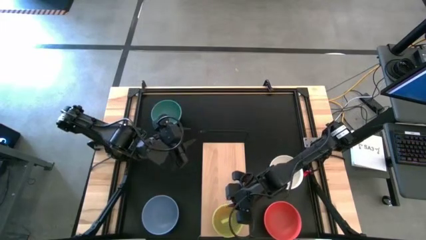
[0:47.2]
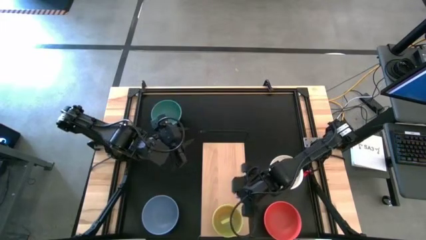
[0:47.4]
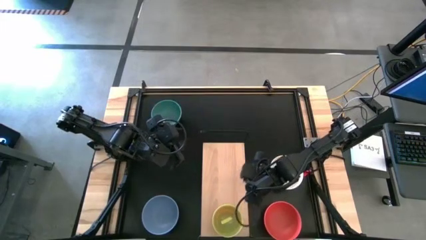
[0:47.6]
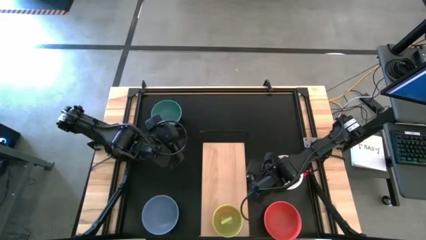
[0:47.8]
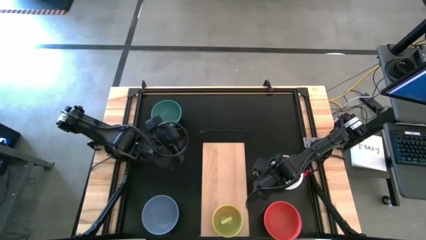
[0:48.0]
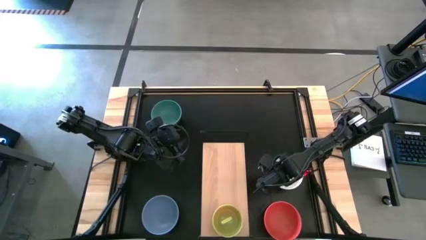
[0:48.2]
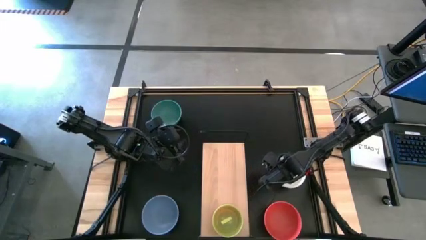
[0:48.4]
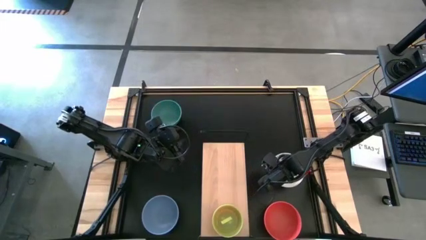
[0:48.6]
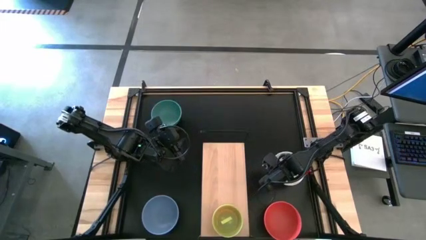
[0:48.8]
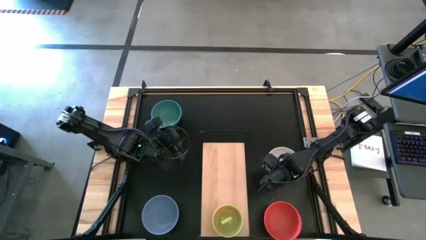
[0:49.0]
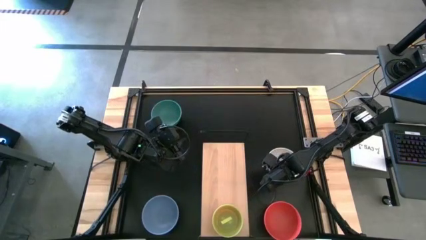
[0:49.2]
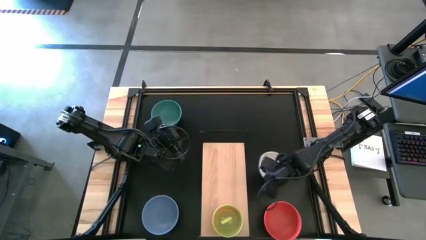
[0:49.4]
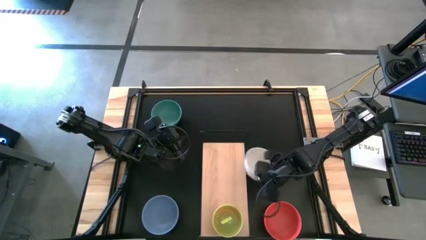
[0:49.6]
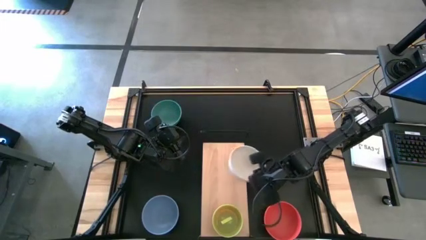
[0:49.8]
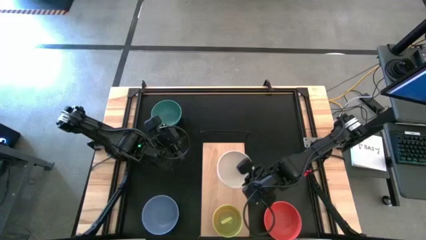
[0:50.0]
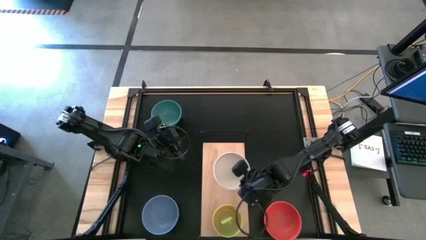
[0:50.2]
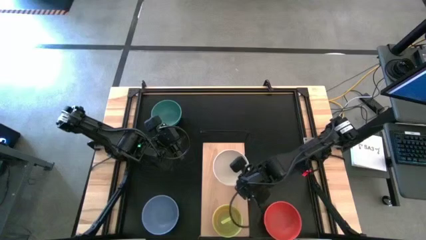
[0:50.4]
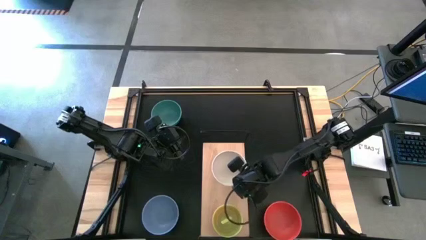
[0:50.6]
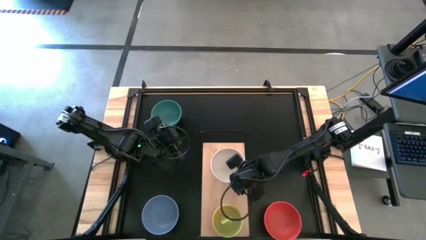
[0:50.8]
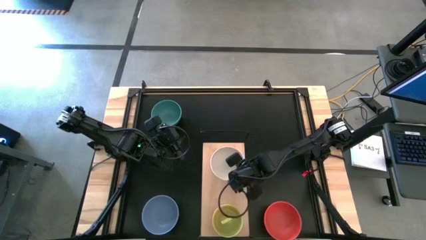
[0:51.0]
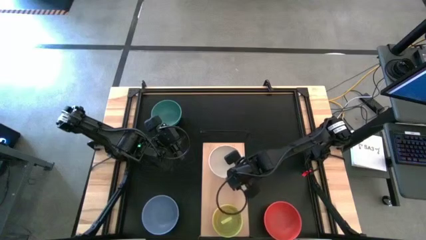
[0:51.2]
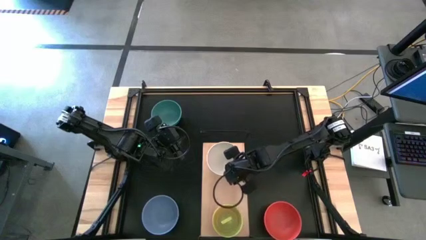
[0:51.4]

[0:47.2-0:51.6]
Task: Place and stack bowls onto a shelf
Put the large white bowl on the shelf

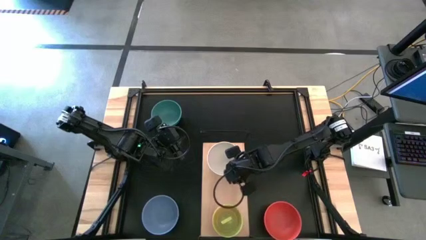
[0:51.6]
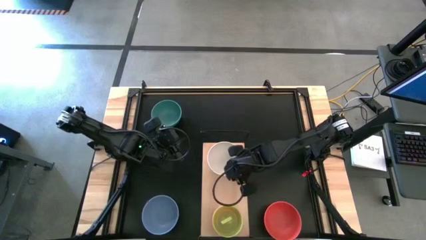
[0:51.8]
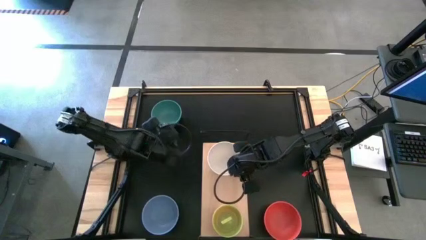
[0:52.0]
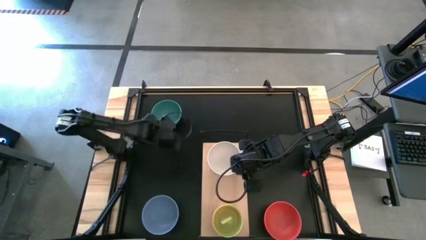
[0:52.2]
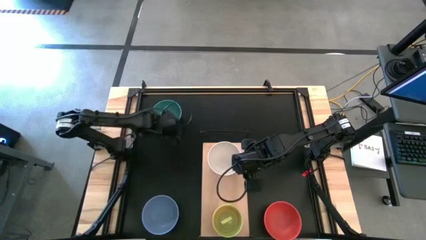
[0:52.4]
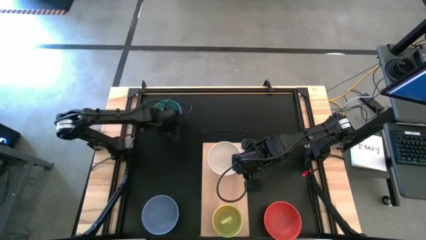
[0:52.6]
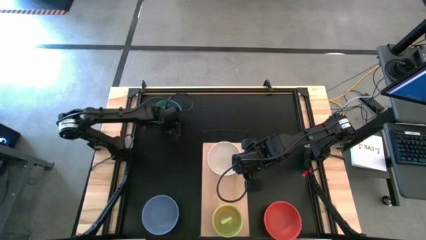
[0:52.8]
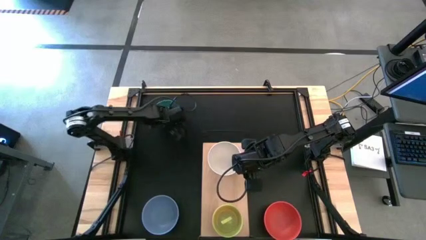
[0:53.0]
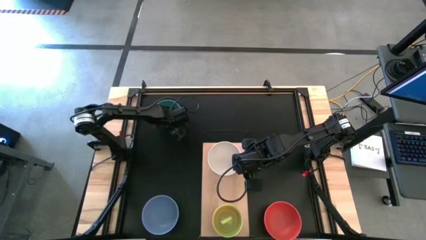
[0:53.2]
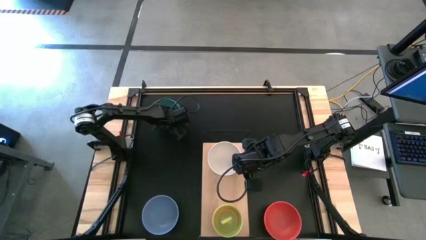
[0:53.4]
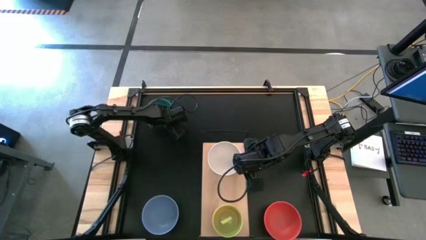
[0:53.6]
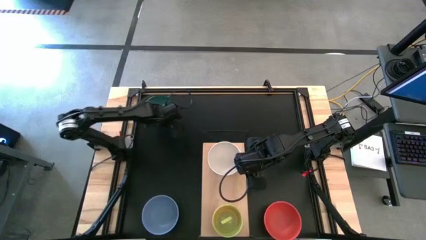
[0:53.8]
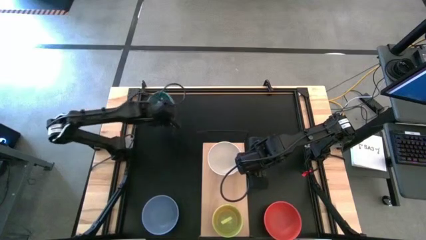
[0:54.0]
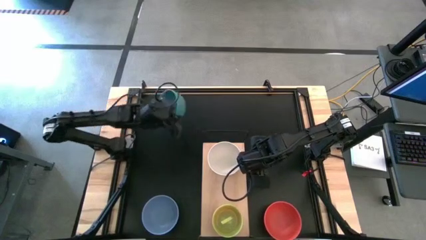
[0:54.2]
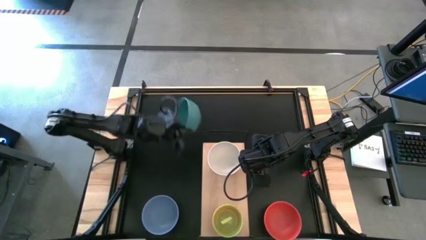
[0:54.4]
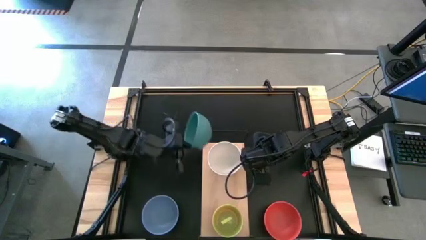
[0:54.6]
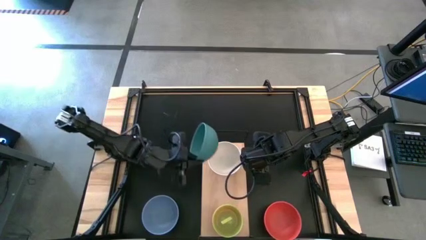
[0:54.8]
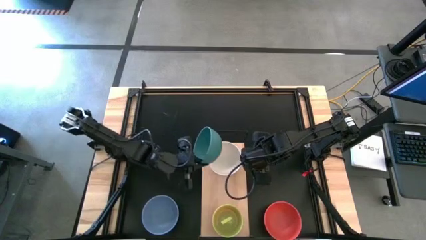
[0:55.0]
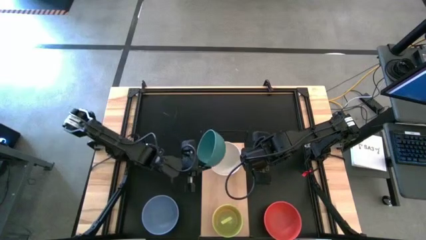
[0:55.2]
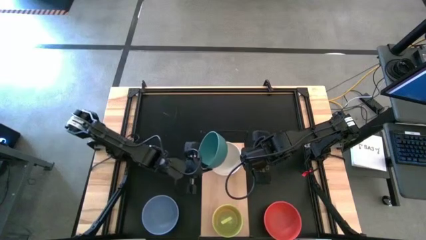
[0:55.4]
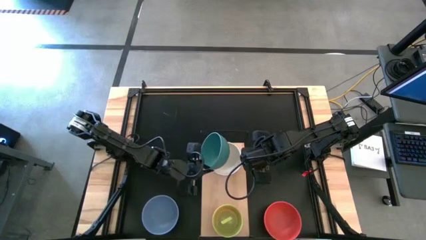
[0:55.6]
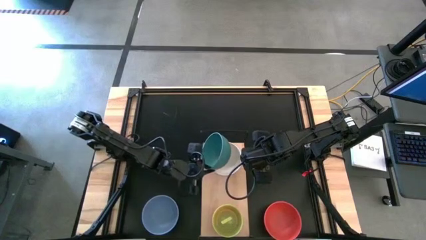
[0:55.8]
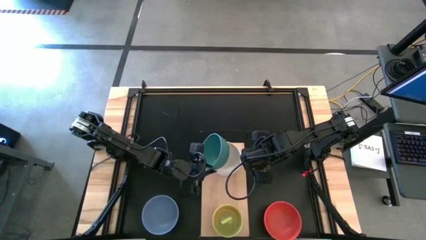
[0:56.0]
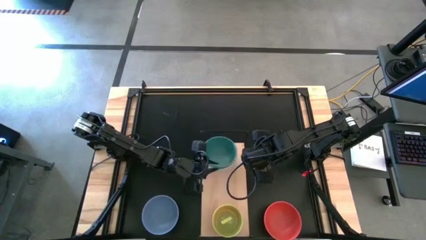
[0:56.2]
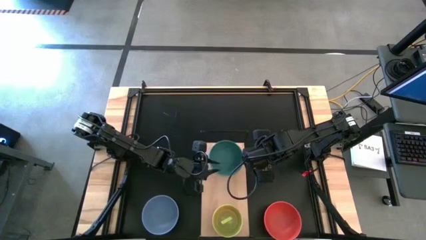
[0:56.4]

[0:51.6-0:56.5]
Stack the large green bowl on top of the large white bowl on the shelf

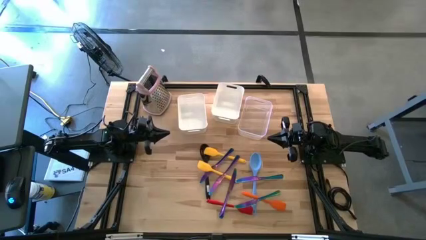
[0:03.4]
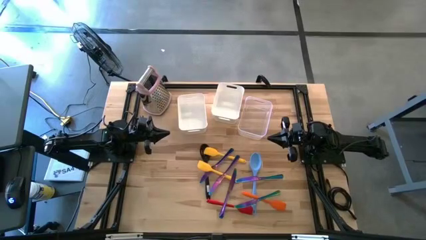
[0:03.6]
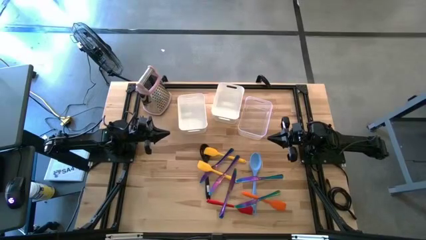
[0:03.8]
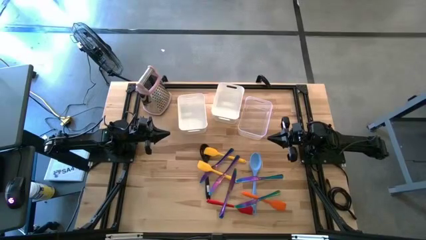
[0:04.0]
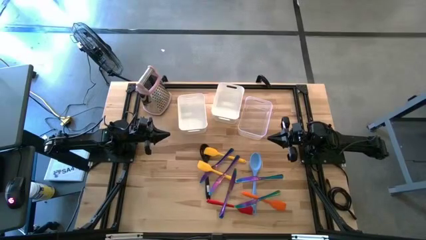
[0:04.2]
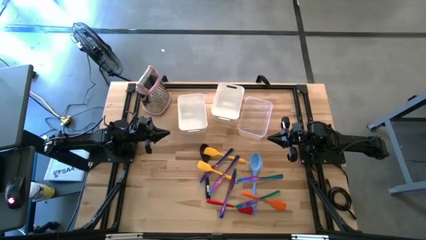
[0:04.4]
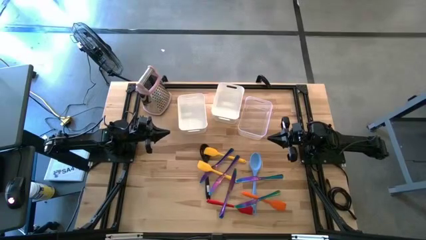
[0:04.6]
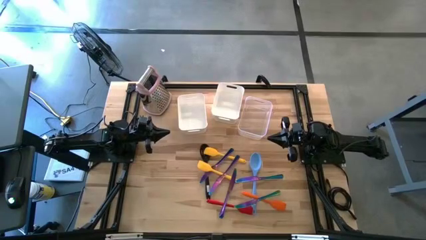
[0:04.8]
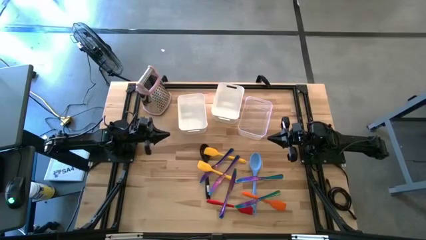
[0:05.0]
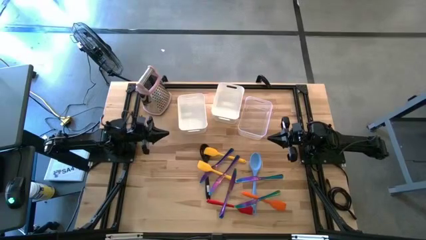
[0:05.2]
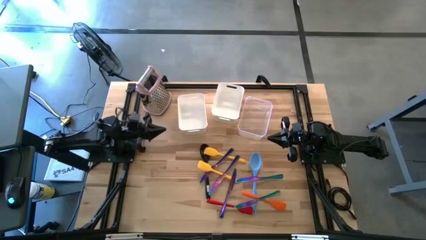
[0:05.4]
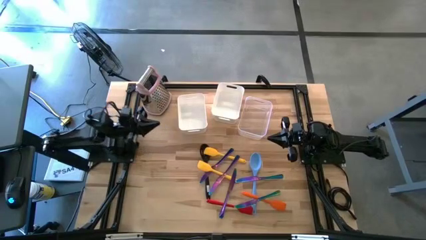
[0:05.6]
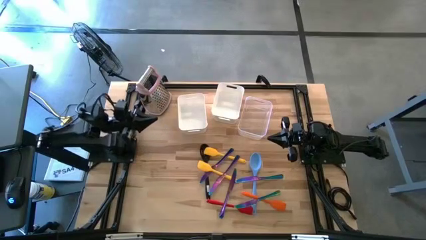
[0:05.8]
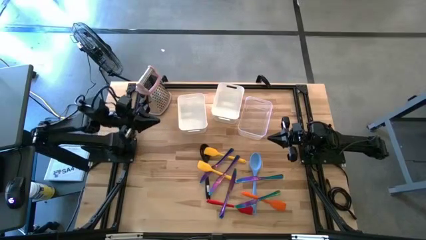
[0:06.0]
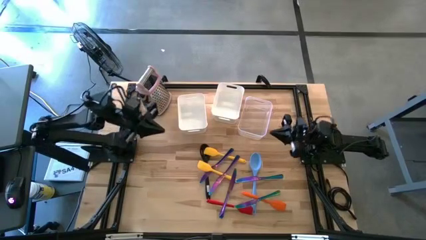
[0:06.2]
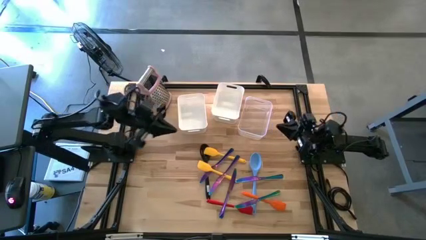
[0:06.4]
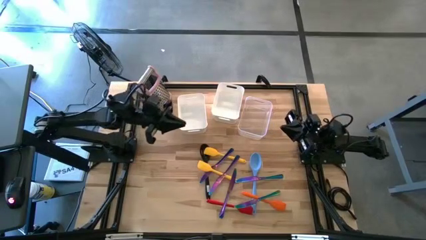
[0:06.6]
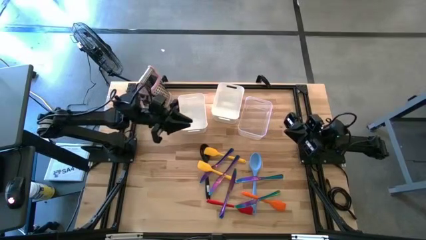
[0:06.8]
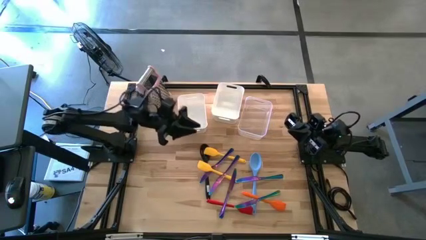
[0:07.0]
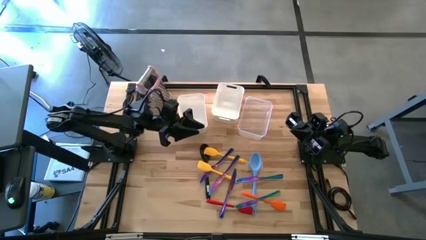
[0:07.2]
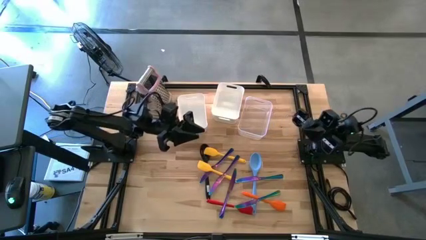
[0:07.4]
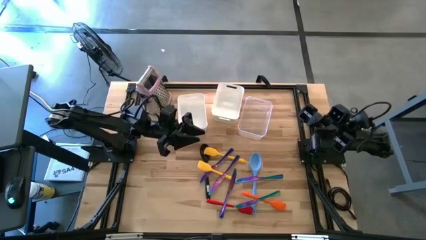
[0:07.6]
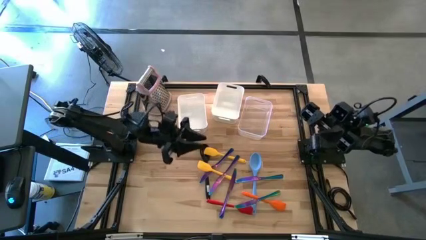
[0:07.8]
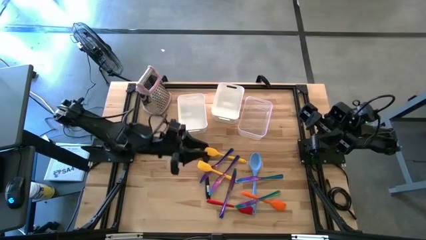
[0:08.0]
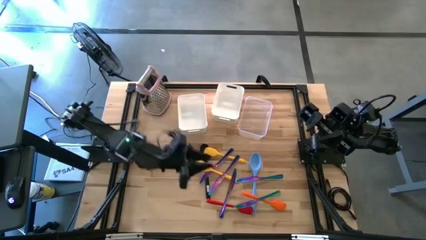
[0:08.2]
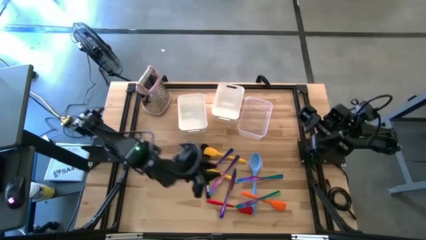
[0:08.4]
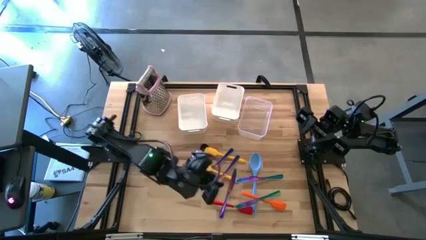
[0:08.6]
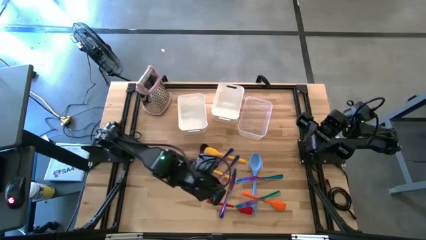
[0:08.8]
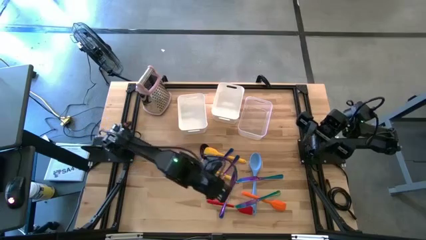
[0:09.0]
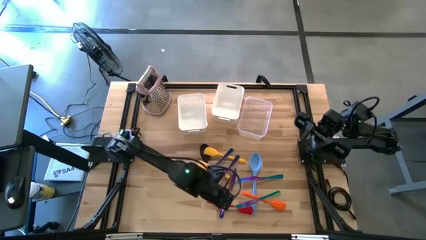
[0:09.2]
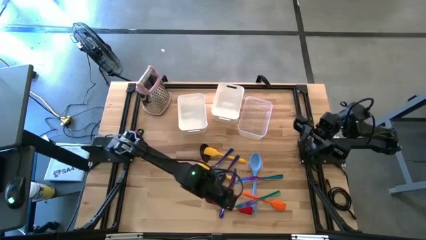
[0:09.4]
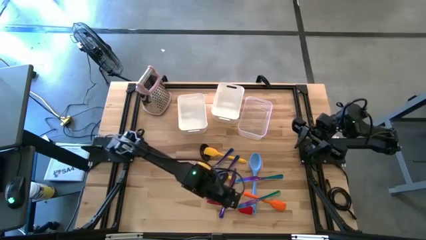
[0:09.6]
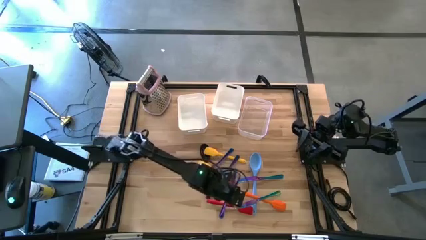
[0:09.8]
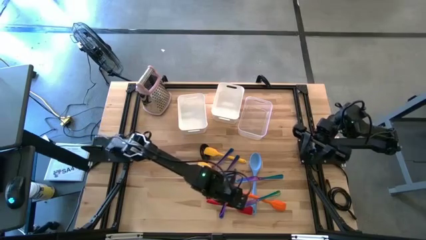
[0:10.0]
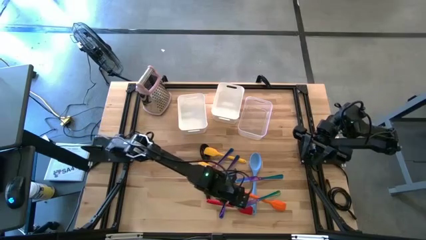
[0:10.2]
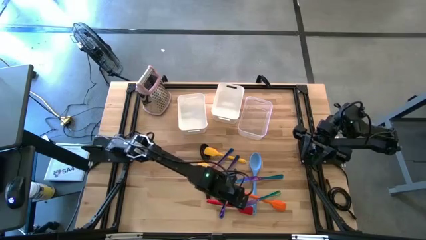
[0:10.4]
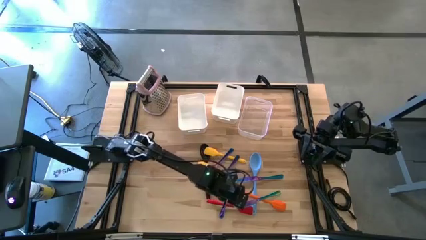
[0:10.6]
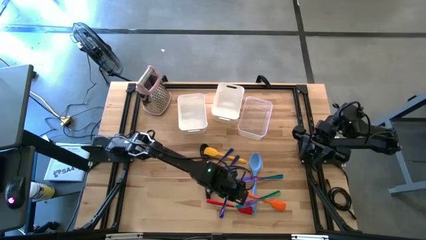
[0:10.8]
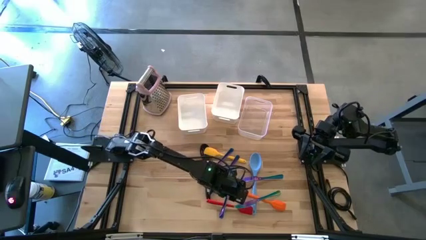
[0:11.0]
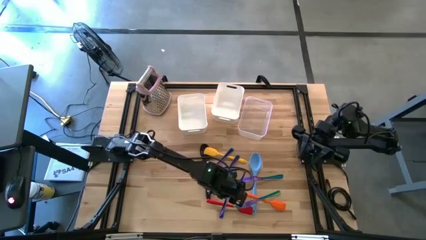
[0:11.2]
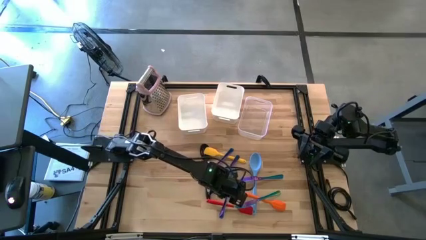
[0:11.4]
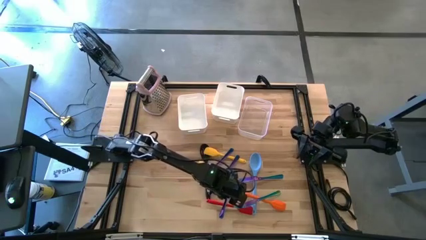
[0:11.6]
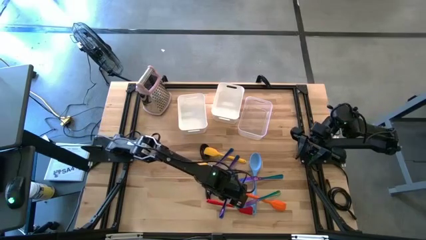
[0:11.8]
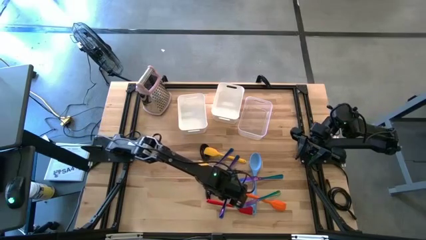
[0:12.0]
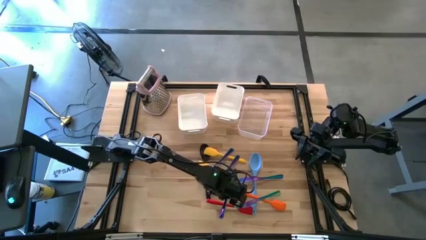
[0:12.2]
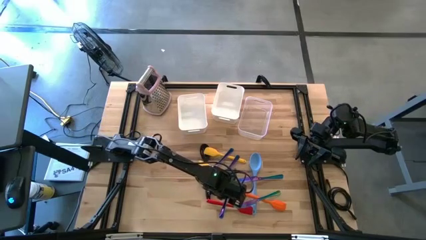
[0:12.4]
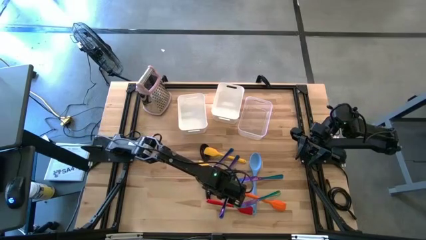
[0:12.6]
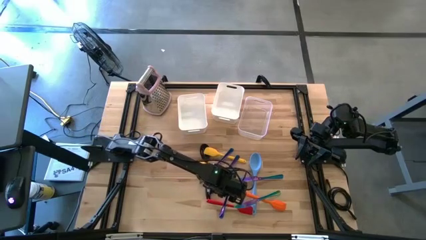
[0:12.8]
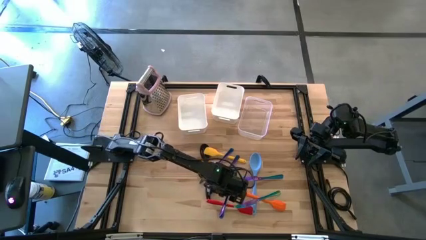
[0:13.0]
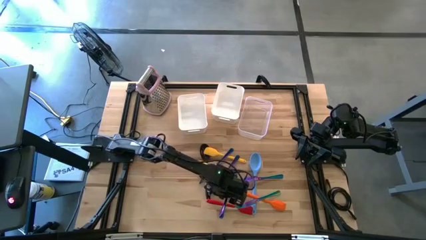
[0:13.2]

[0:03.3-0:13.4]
Task: Pick & Place Kitchen Items
Put the violet table knife into the left white bin
